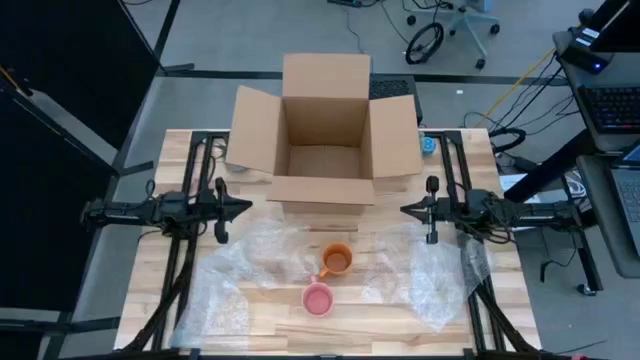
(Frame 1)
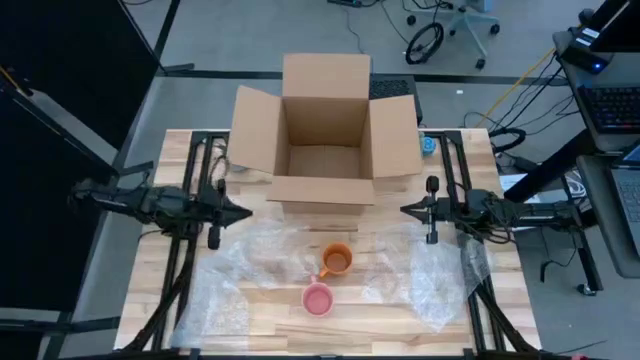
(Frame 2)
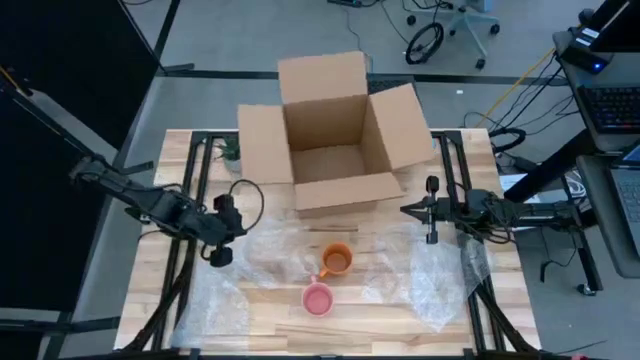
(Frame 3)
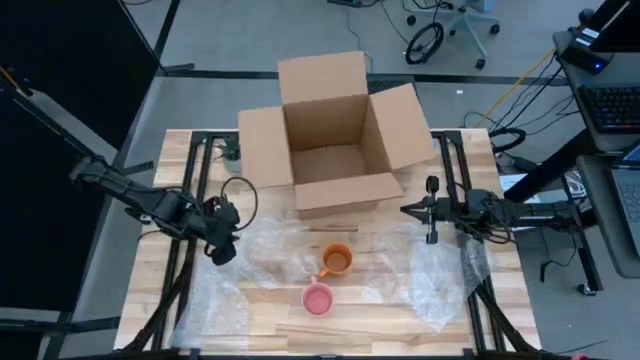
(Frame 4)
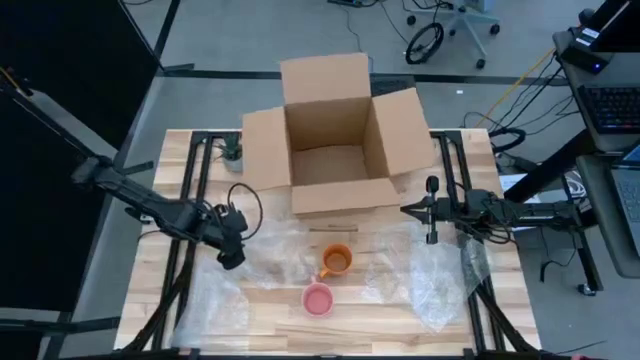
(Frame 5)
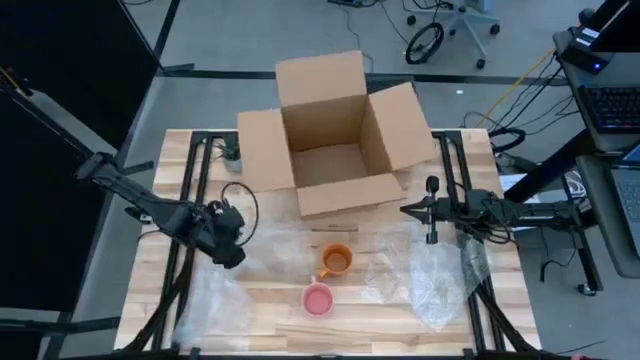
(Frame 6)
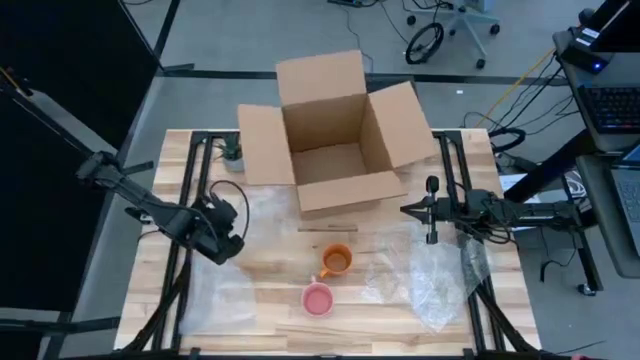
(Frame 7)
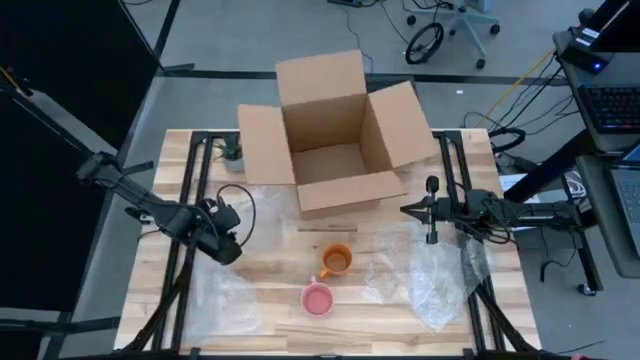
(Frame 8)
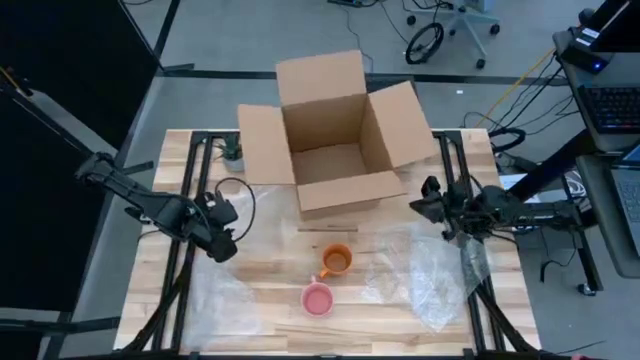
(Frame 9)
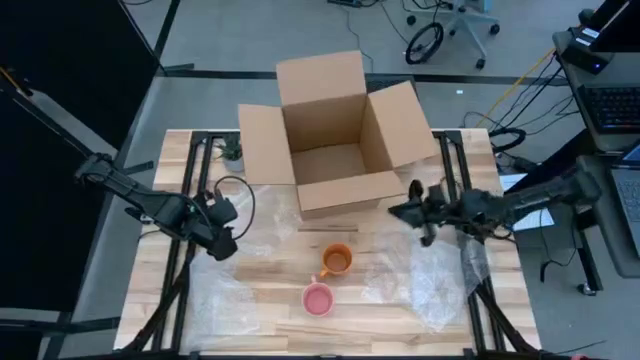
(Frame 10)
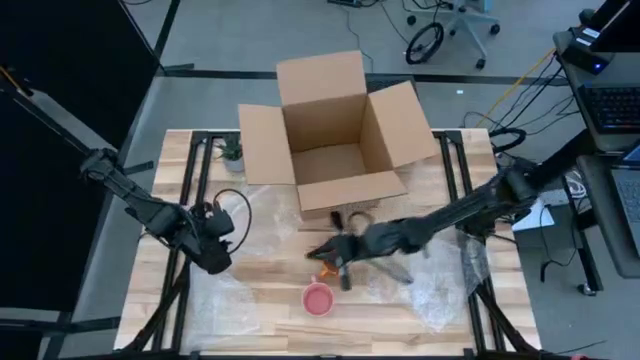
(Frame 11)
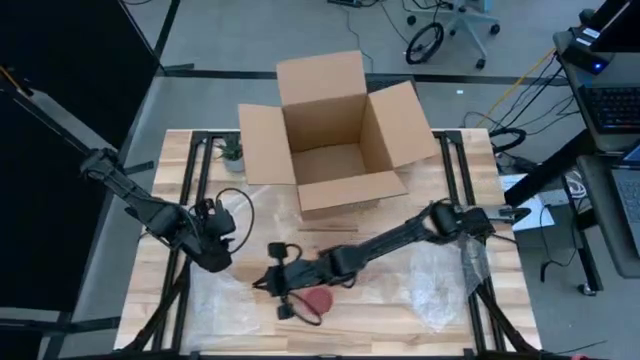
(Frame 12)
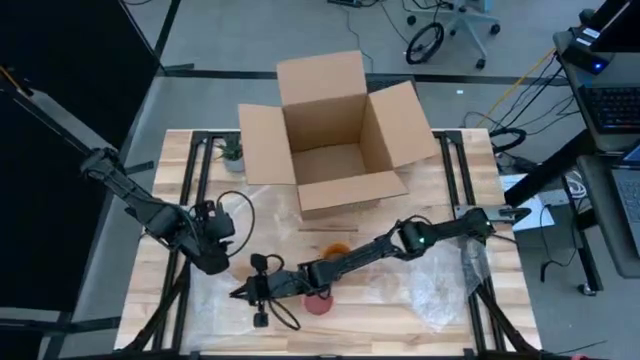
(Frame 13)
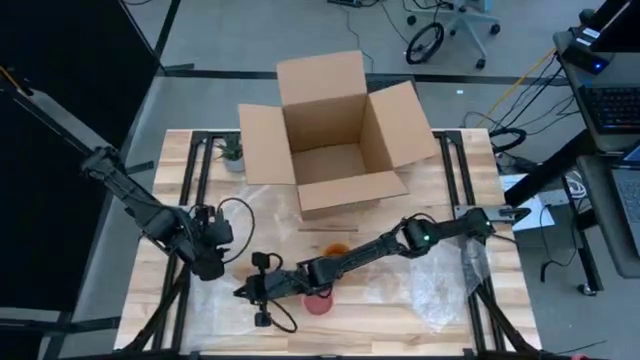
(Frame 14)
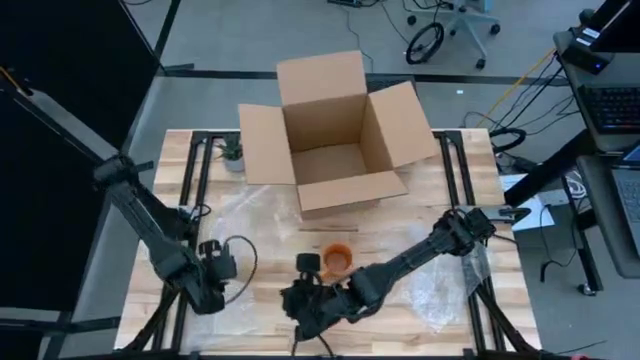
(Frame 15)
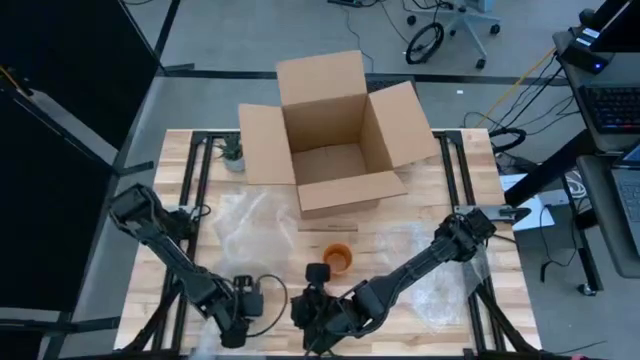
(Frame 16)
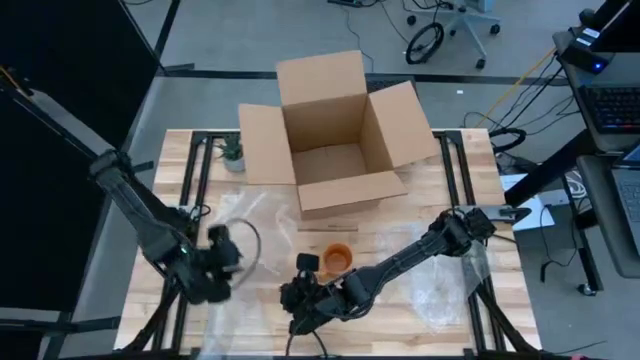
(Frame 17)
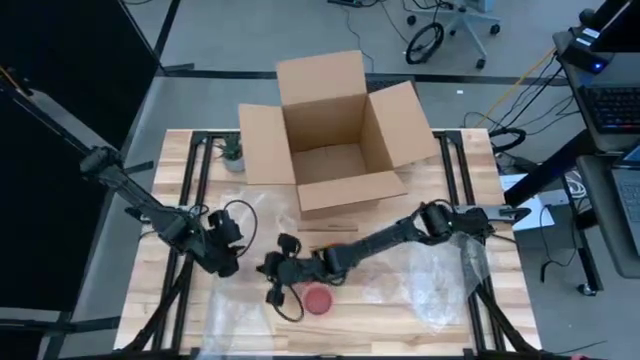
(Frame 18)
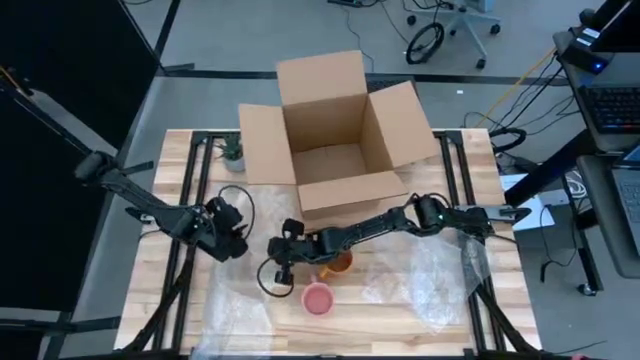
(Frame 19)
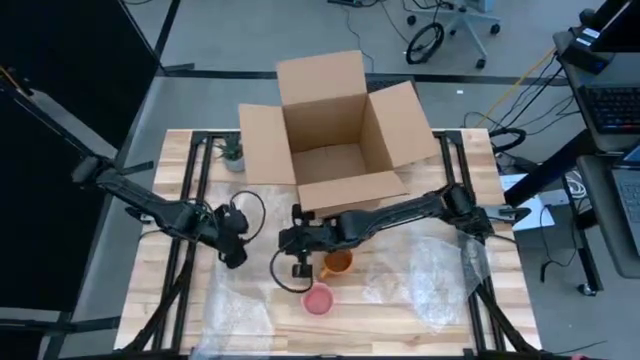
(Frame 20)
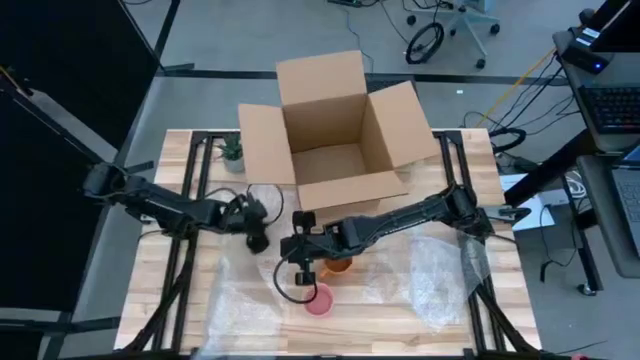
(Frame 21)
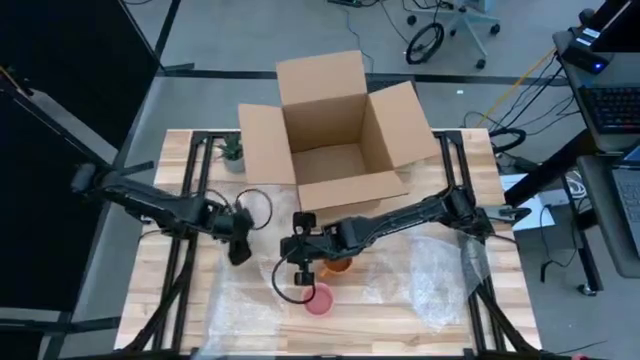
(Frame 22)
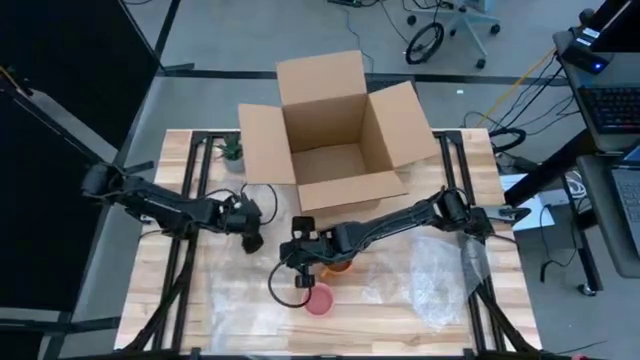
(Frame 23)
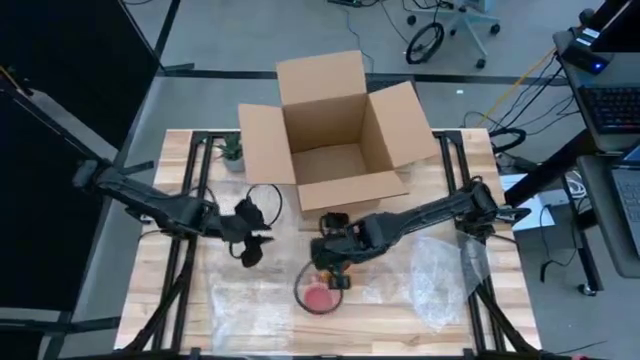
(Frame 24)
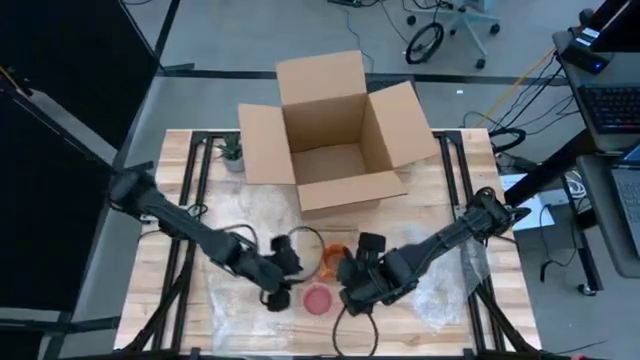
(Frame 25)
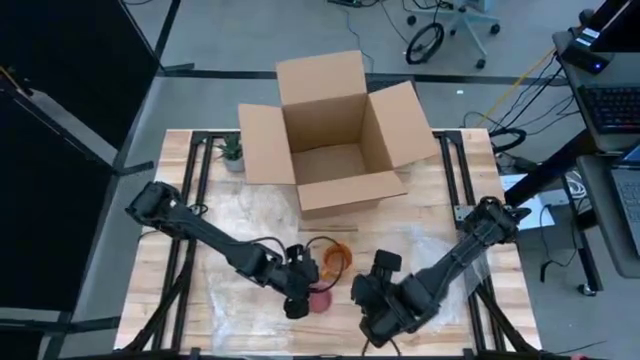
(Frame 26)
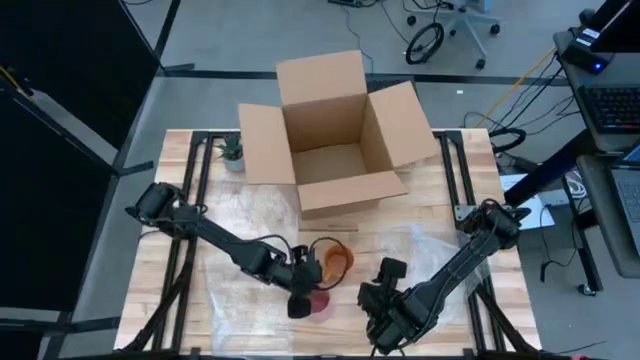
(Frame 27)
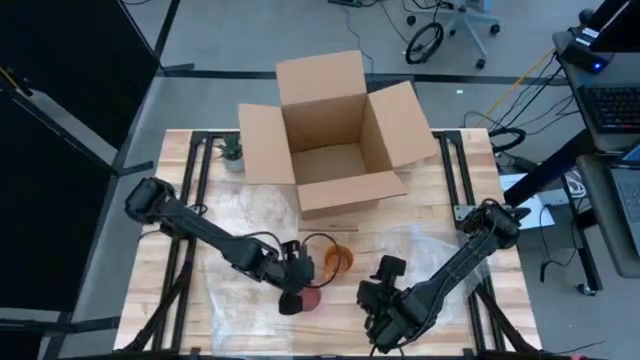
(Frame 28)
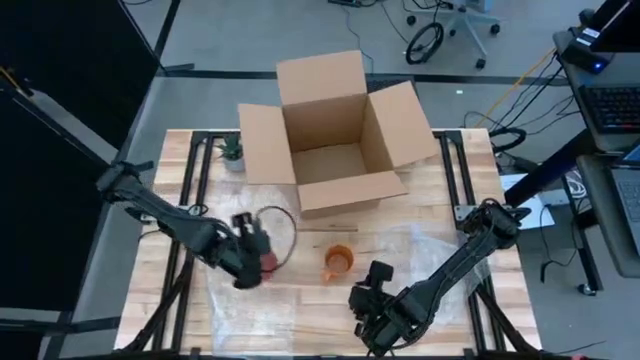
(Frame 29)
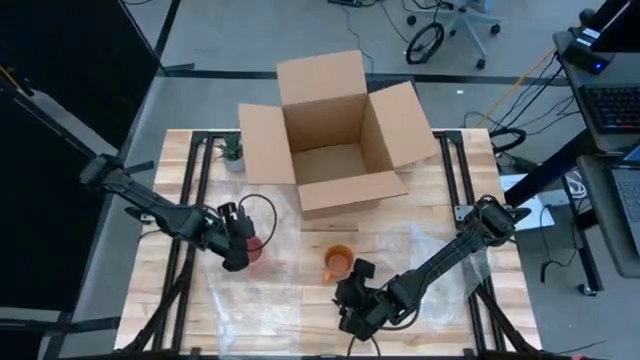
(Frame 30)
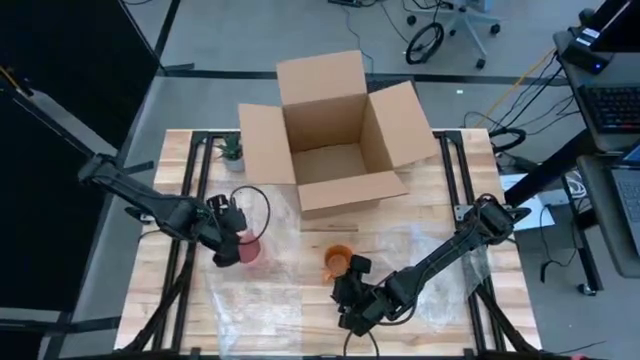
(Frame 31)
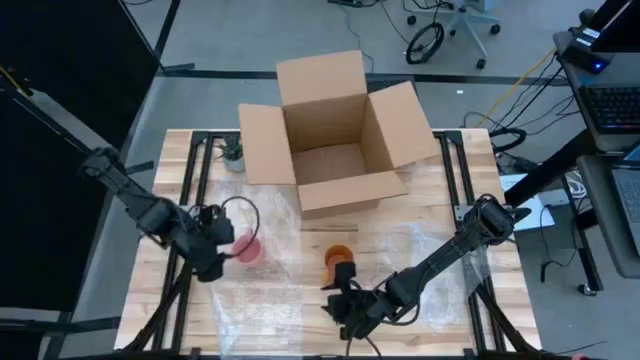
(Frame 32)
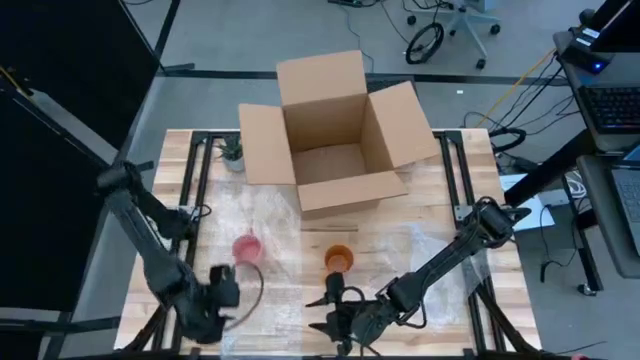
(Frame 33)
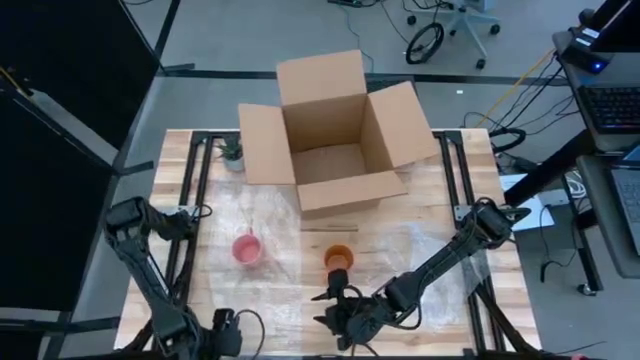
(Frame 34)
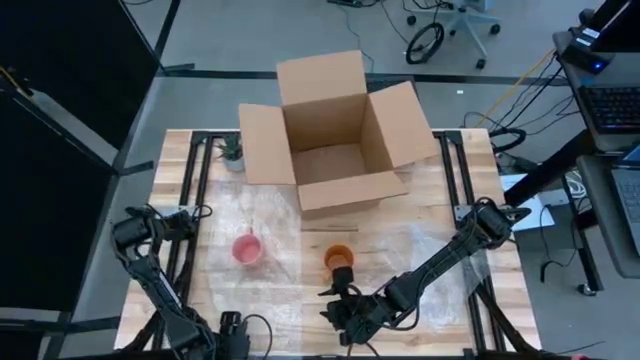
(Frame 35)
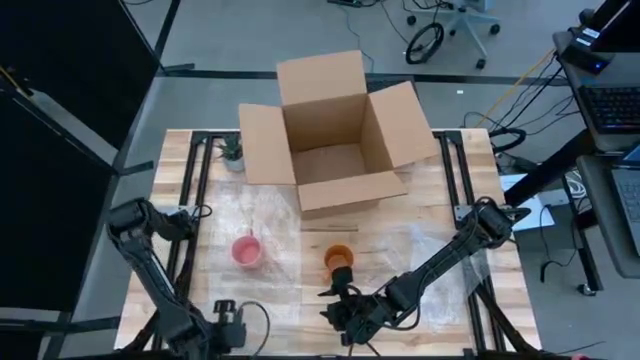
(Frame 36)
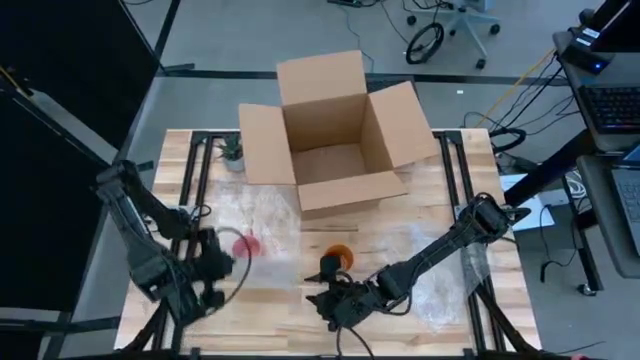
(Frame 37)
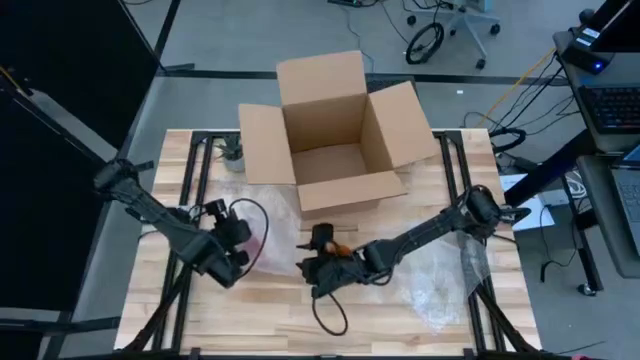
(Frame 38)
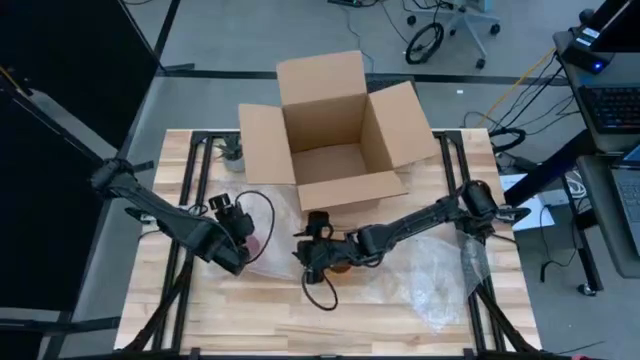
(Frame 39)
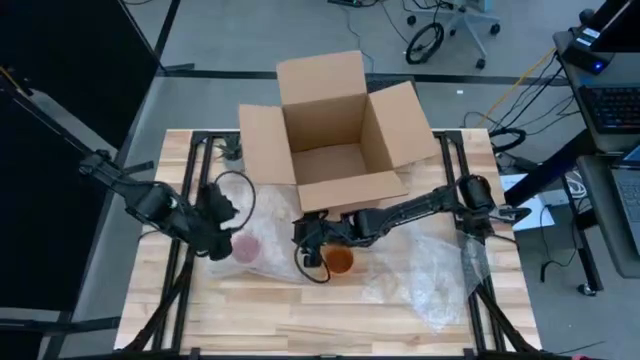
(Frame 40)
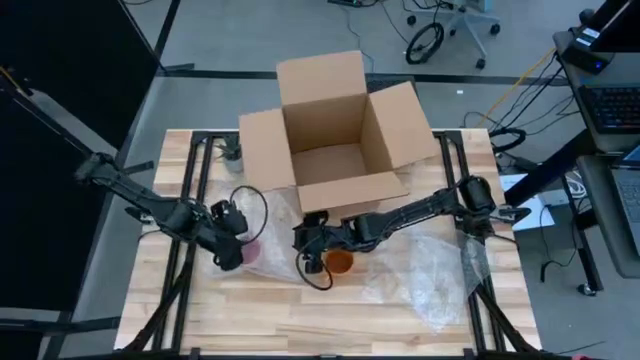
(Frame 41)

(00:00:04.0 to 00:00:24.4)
Task: wrap mug
Wrap the pink mug with transparent bubble wrap
